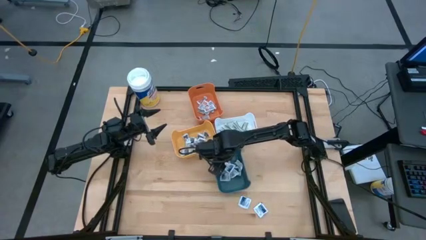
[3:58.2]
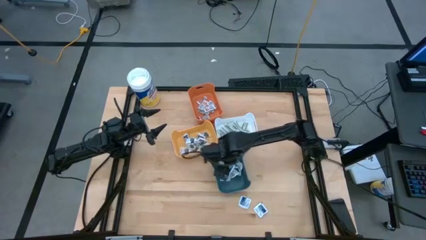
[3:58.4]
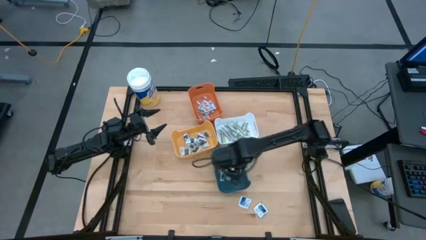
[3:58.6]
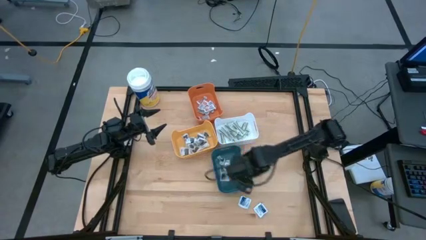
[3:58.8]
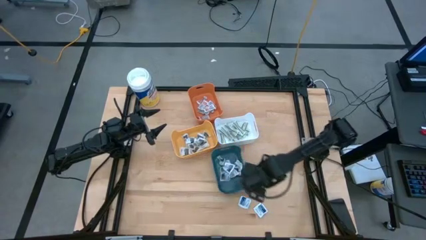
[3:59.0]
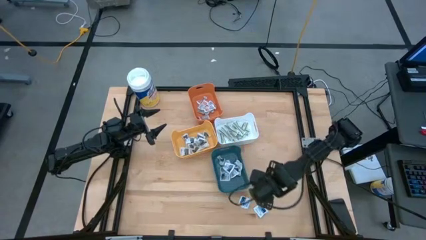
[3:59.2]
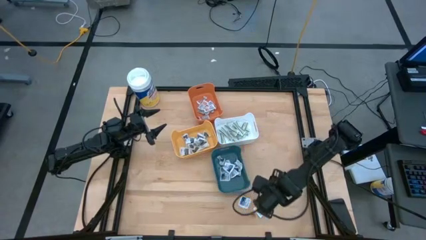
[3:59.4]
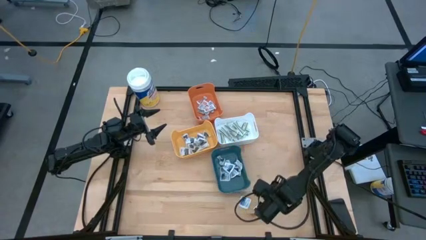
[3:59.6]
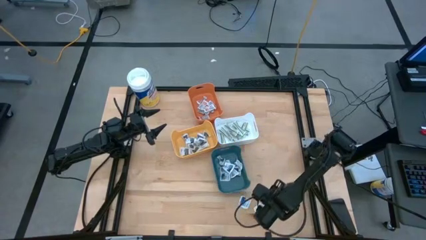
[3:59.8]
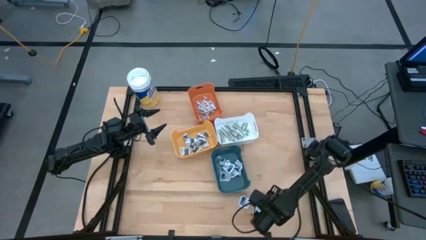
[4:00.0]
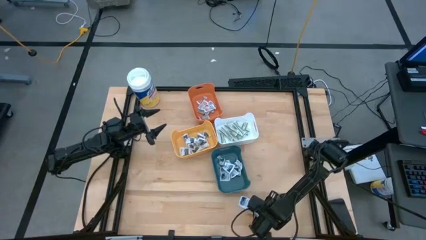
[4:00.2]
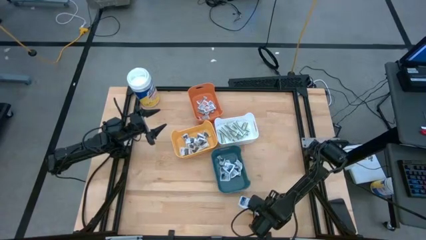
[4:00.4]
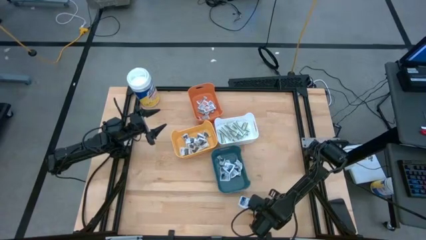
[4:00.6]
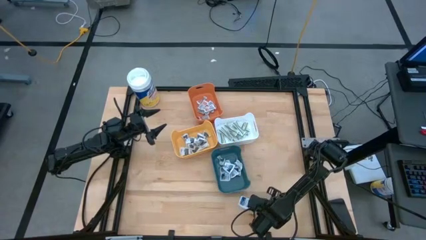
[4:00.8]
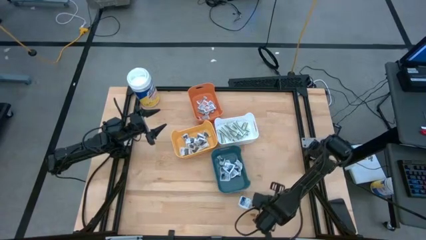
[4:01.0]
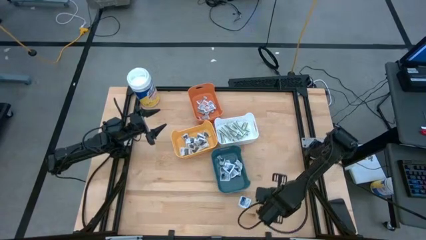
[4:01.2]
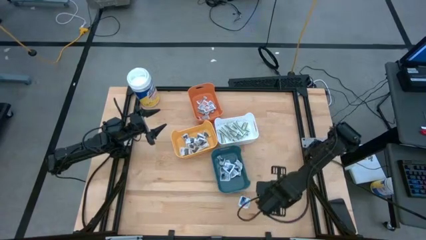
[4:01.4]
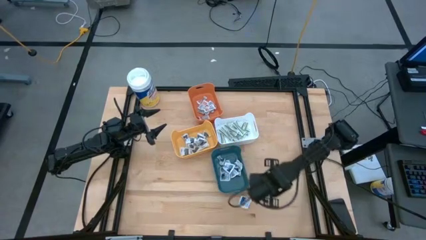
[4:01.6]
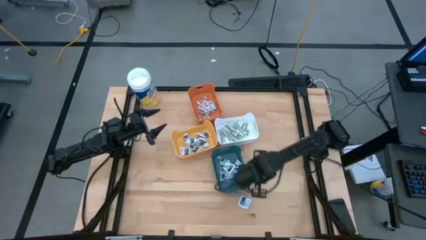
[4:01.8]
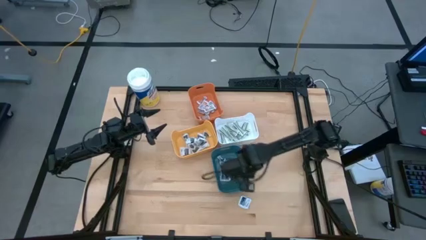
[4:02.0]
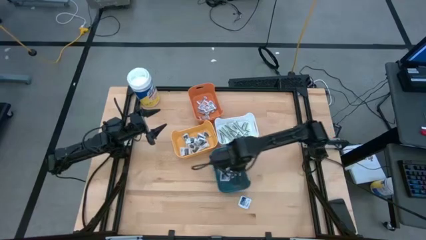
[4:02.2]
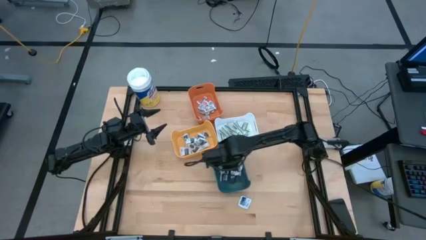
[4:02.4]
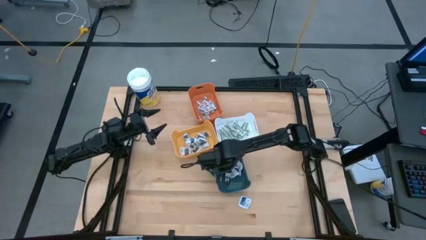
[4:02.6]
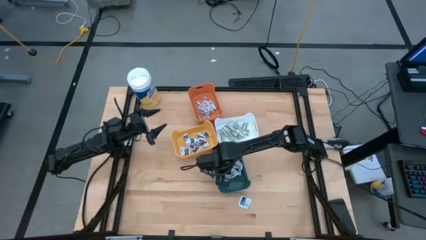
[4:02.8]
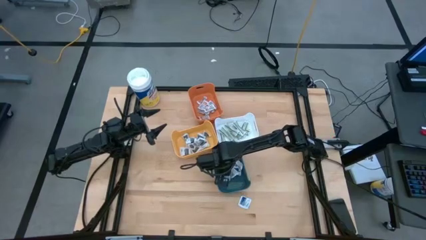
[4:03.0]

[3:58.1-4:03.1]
Task: Pick & Place First Aid Supplies
Put the blue alcohol pad into the blue bin

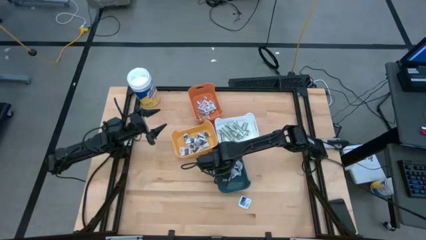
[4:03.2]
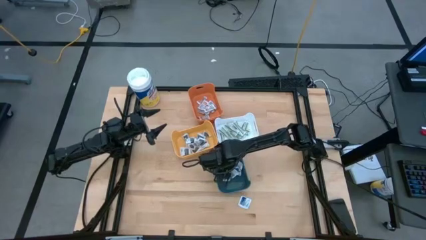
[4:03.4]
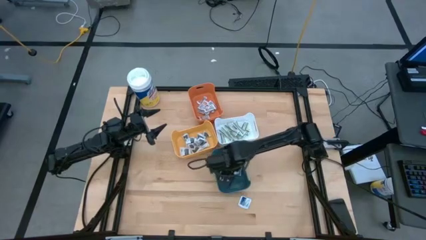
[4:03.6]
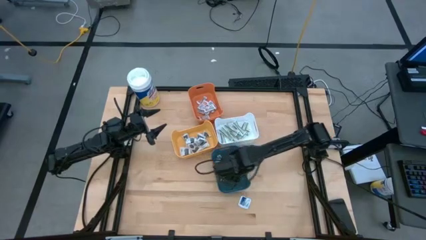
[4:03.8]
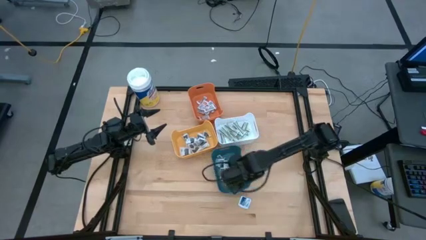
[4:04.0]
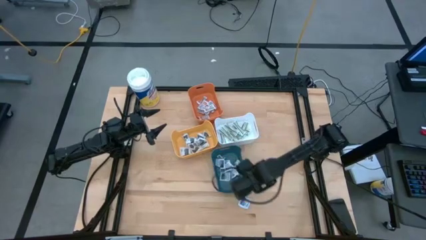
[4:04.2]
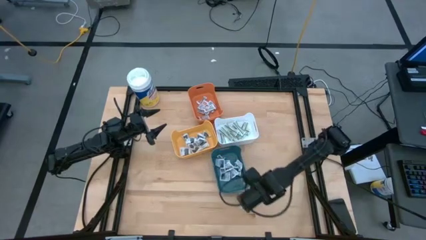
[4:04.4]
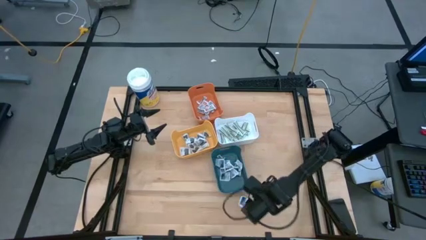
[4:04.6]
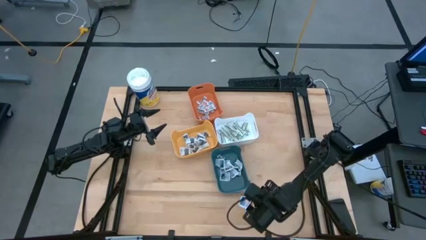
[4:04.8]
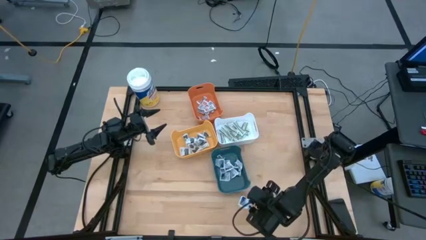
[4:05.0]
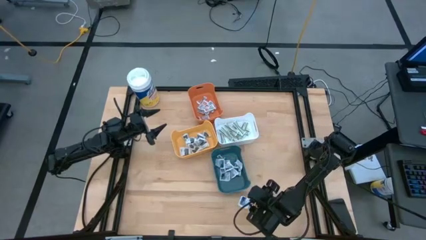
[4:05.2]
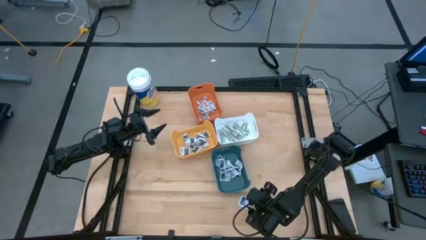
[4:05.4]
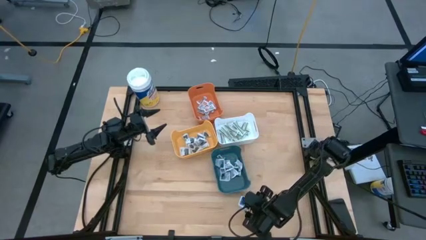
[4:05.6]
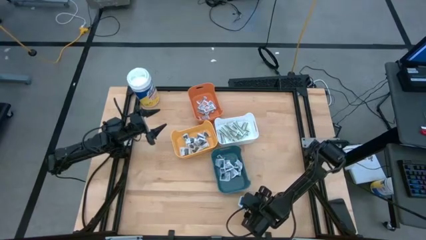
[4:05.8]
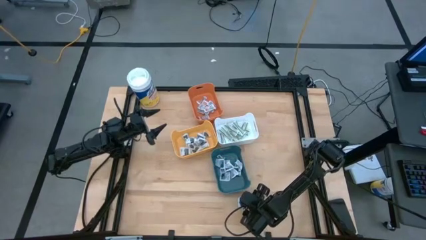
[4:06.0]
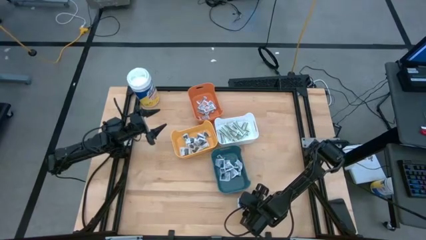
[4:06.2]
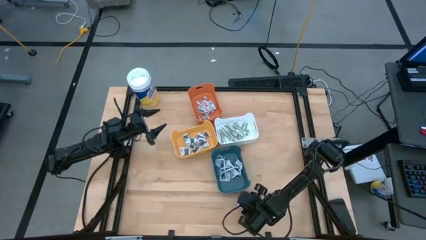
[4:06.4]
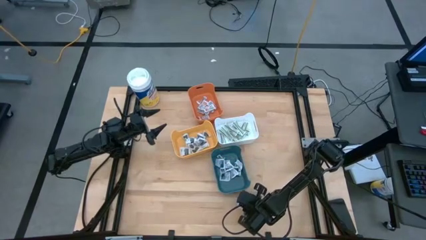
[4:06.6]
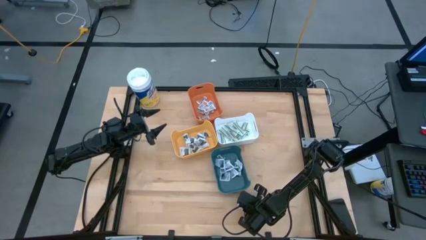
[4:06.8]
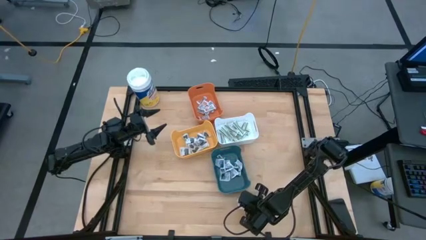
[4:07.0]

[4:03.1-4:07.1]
Put the blue alcohol pad into the blue bin

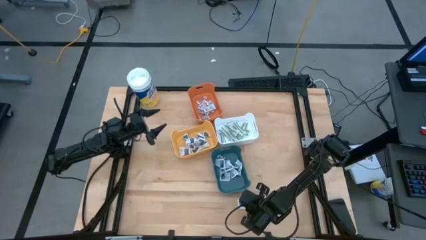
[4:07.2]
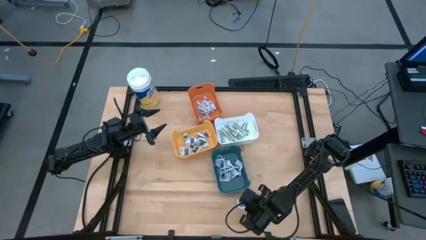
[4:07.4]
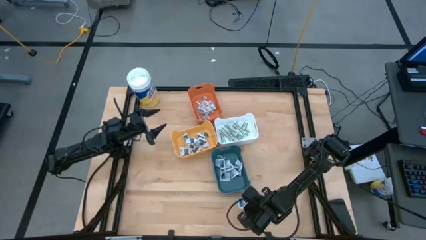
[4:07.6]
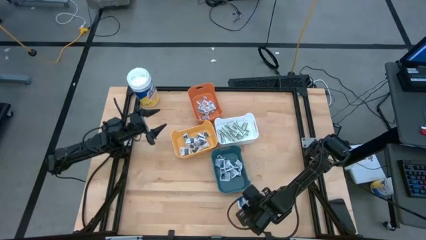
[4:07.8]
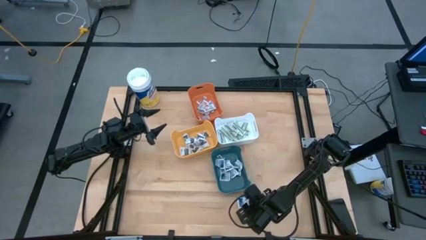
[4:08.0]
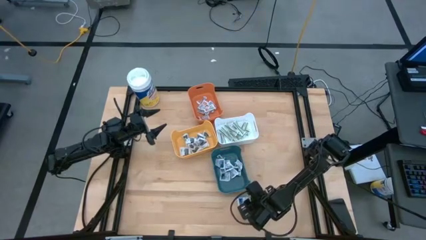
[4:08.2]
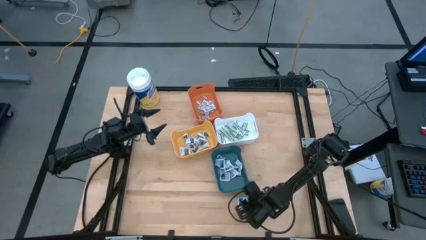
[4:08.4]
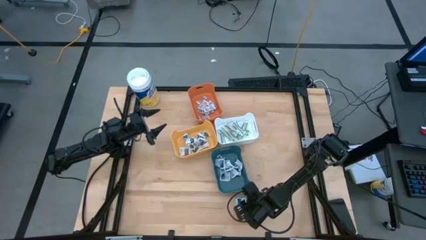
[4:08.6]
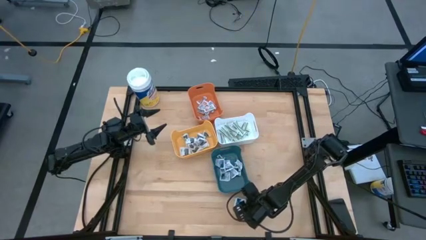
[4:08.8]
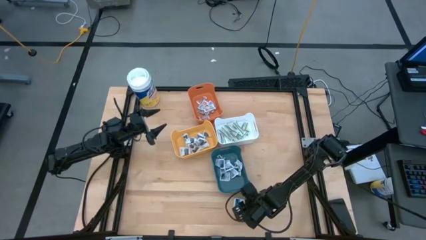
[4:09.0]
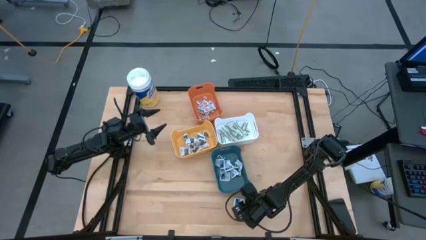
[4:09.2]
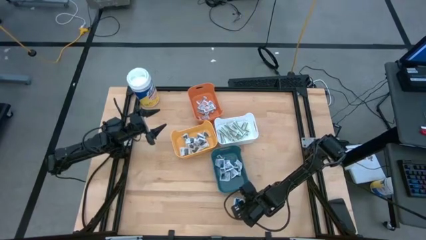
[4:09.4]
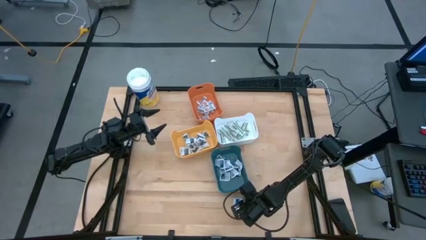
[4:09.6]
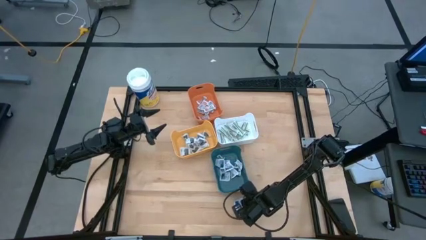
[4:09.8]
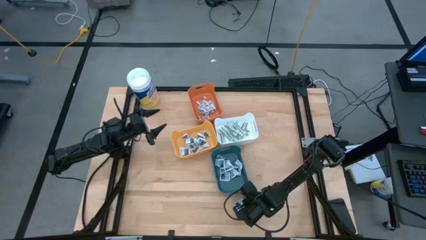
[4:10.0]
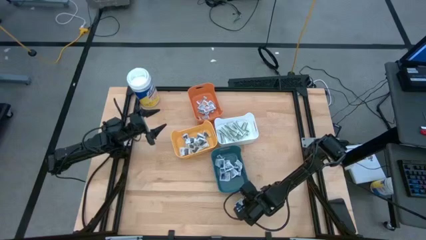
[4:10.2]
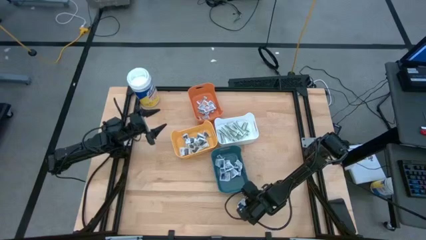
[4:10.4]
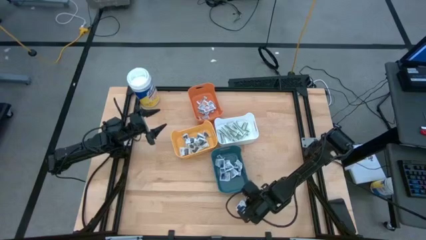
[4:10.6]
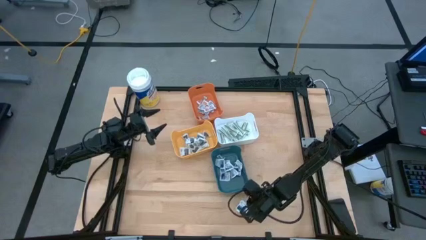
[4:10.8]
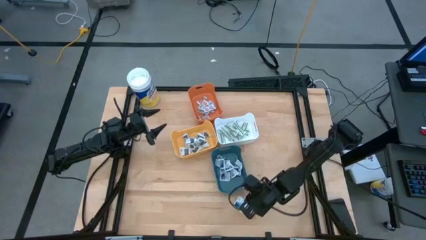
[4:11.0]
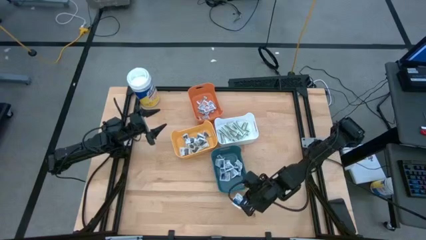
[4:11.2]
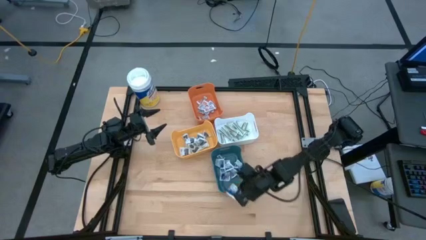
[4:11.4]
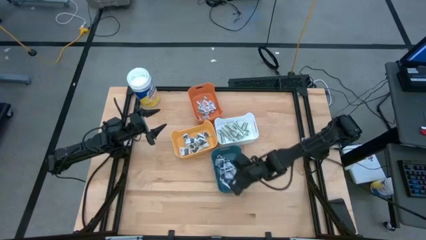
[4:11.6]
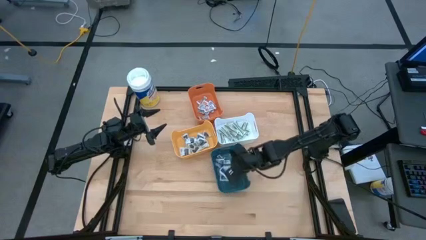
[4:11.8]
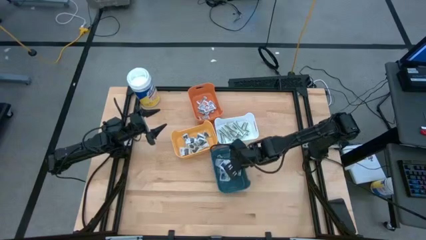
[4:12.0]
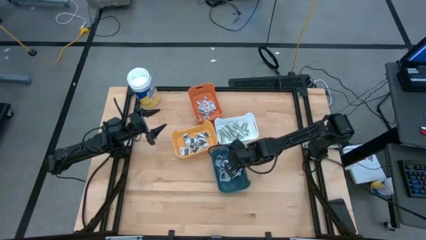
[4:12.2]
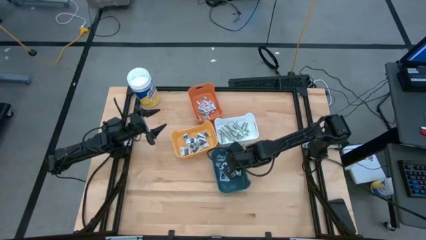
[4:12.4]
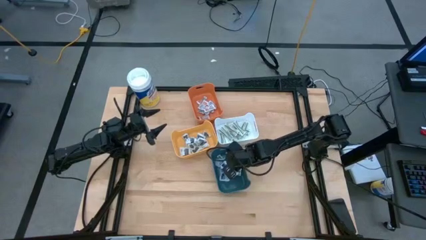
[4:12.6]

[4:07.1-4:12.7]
Put the blue alcohol pad into the blue bin

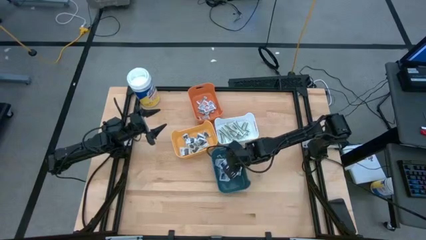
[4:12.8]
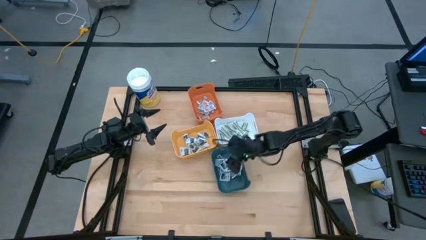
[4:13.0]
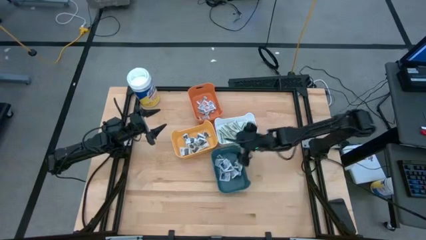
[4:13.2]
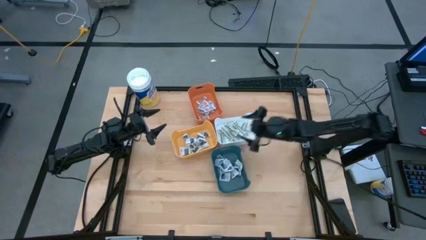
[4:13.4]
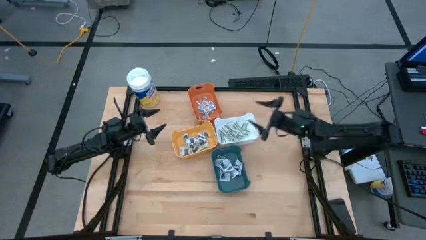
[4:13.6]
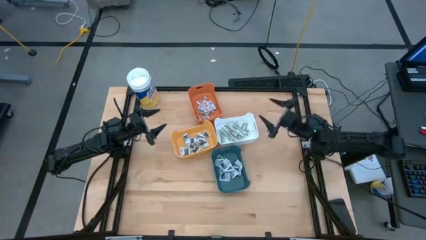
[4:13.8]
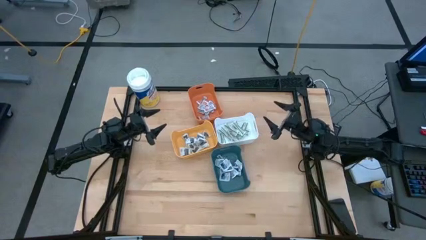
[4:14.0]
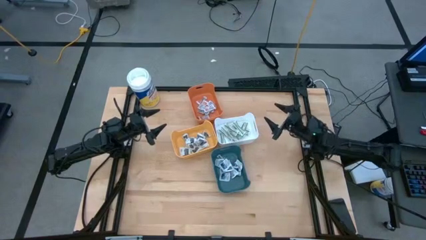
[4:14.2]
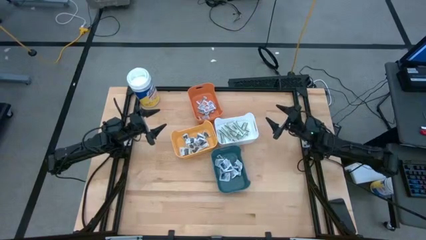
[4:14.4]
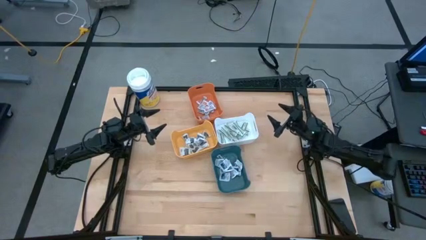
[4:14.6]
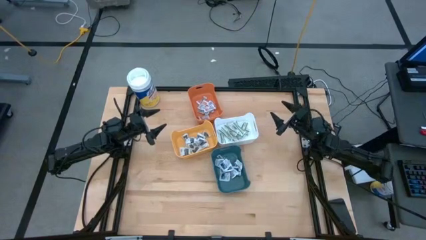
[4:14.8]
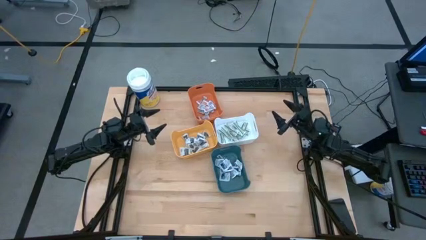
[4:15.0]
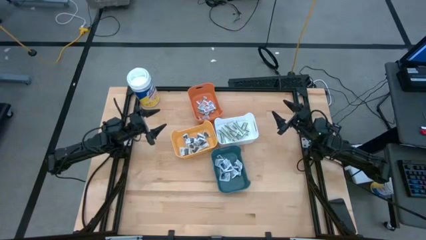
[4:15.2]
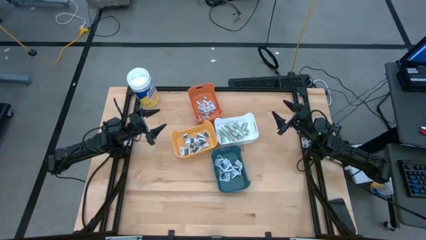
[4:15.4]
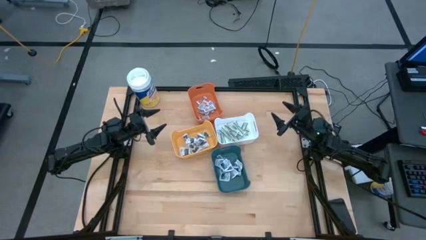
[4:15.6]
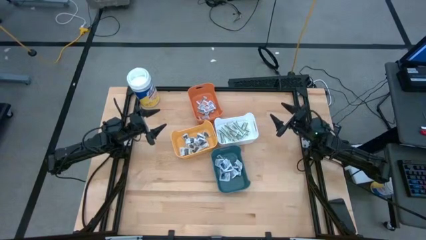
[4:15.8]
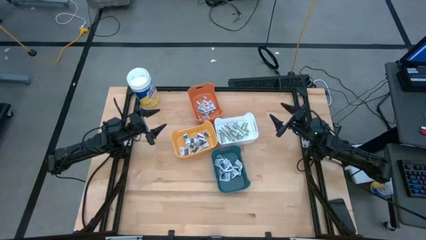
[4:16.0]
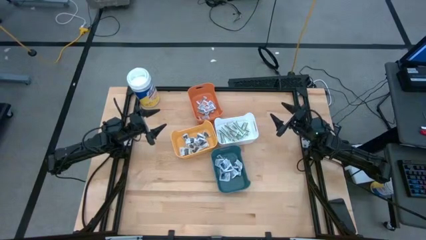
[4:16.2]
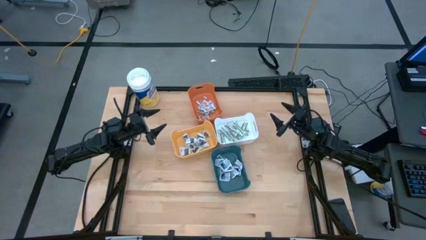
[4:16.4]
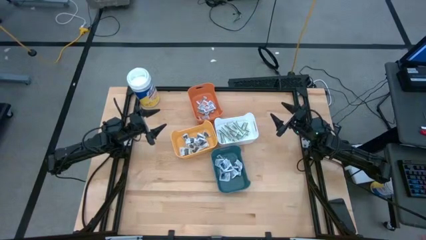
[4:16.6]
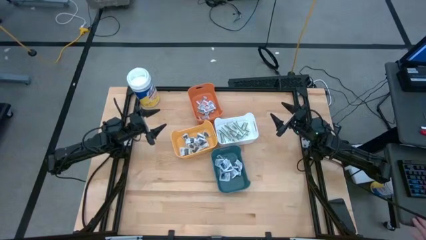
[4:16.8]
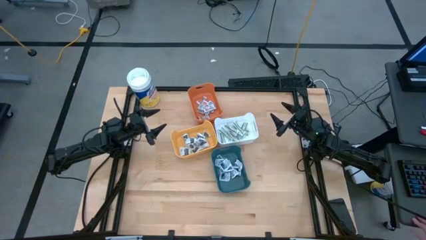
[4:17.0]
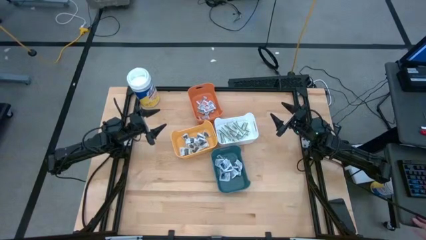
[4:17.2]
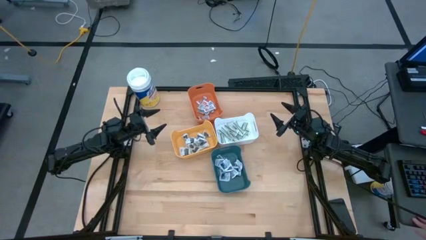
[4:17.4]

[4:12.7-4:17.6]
Return to Home Position
